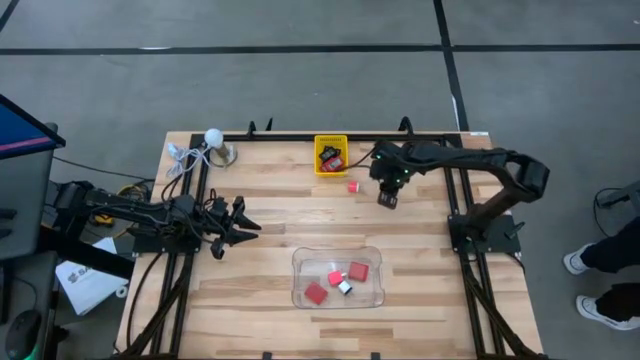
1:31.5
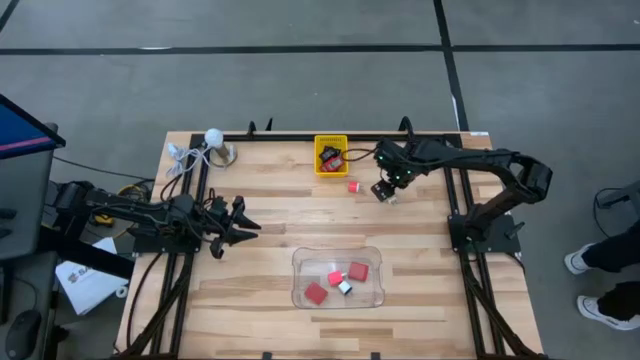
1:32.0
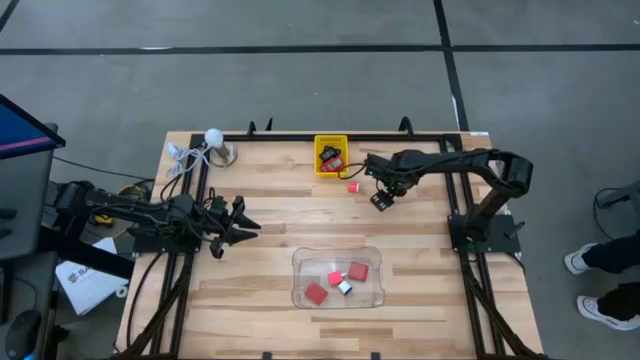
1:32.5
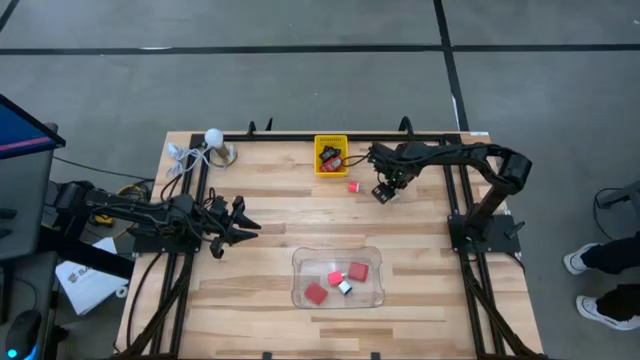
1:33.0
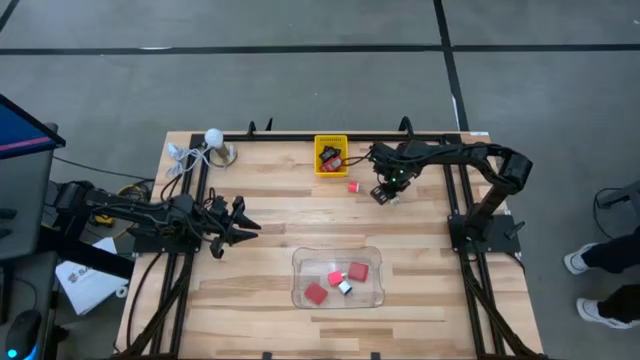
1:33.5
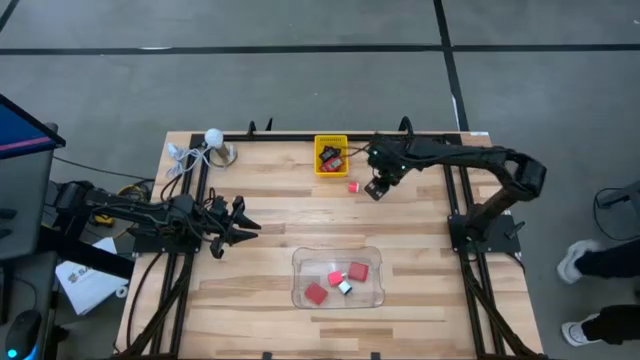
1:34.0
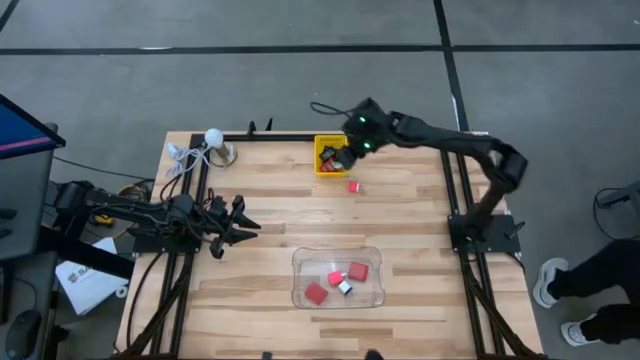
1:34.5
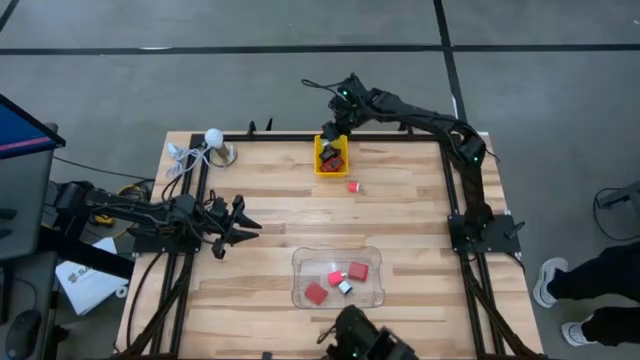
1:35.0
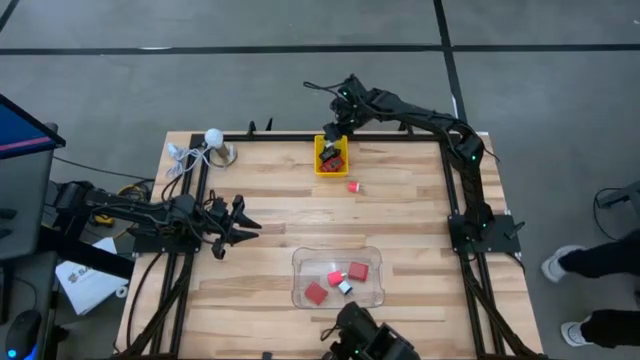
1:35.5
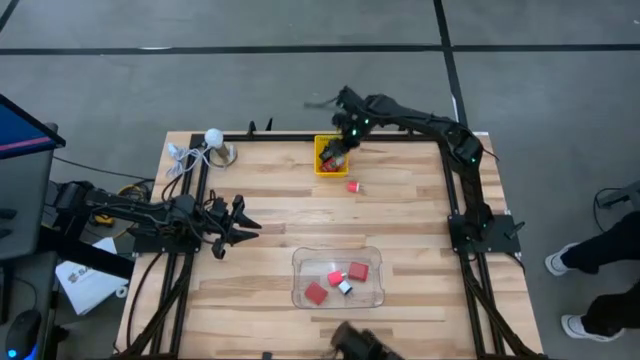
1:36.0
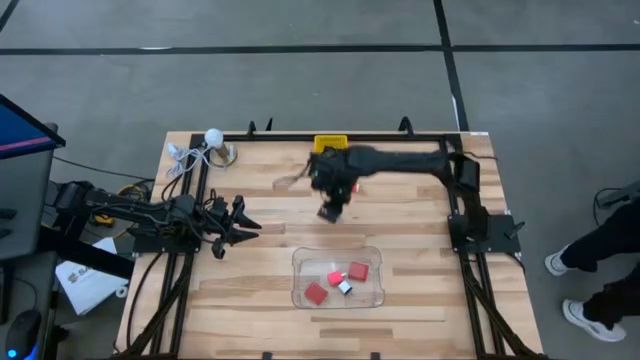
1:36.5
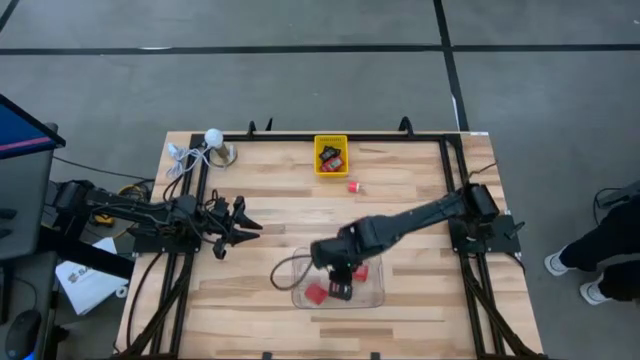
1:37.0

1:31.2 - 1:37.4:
Task: Pick & Place Office items
Put the green charger adapter into the transparent bin

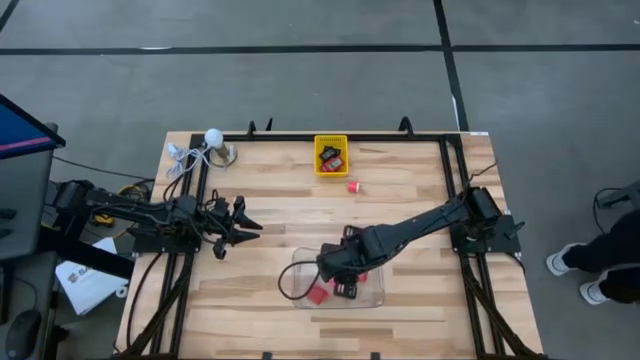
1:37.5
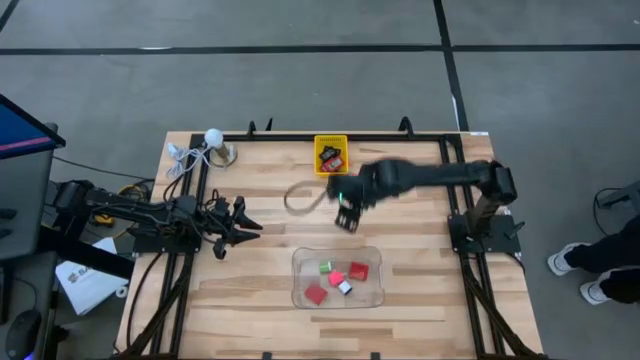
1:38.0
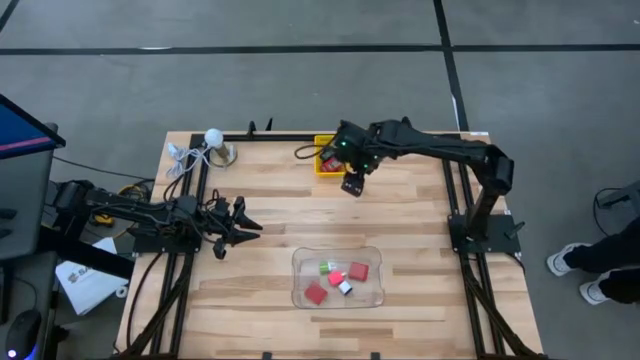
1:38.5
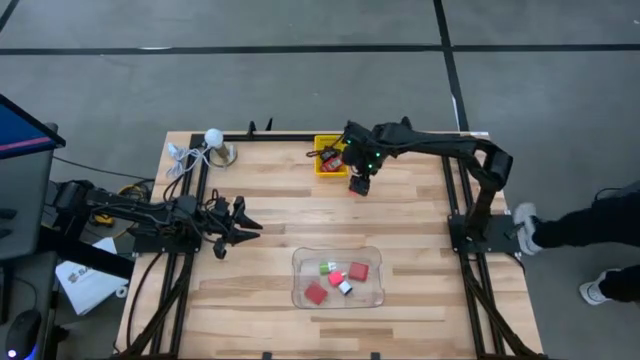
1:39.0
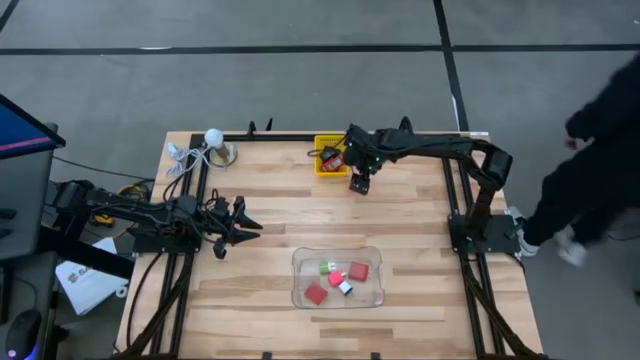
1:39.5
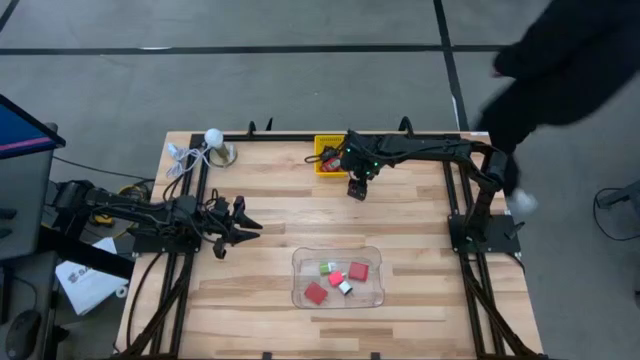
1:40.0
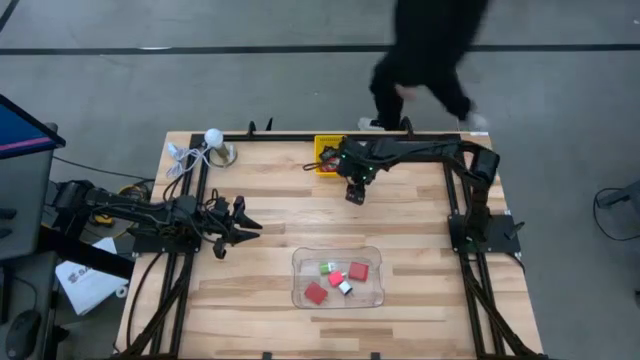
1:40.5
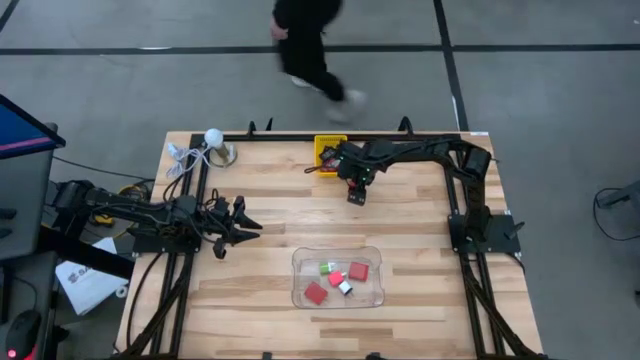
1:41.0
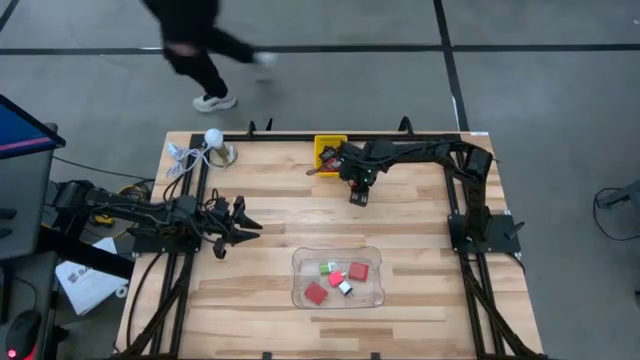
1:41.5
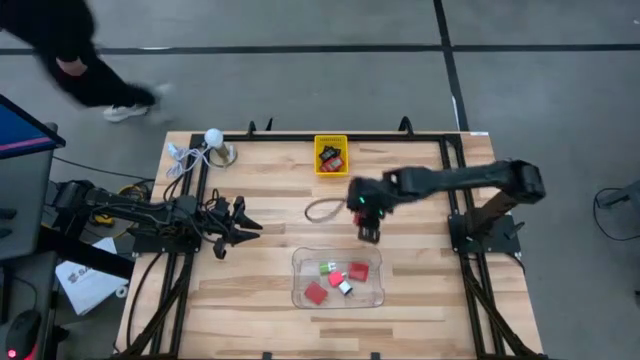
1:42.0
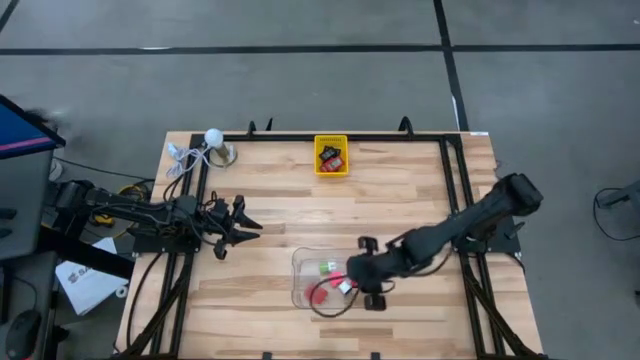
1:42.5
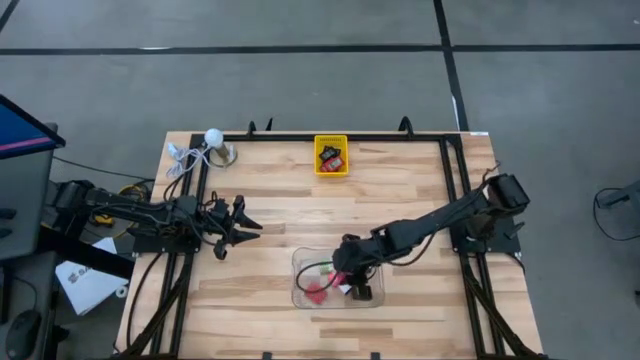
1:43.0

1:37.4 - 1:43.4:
Put the pink charger adapter into the transparent bin

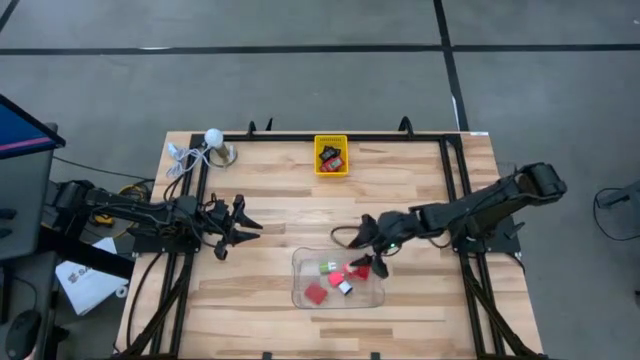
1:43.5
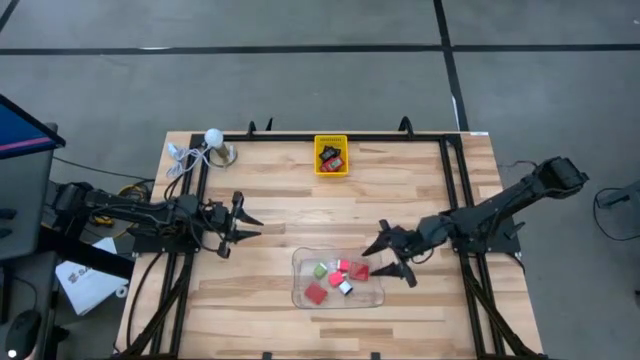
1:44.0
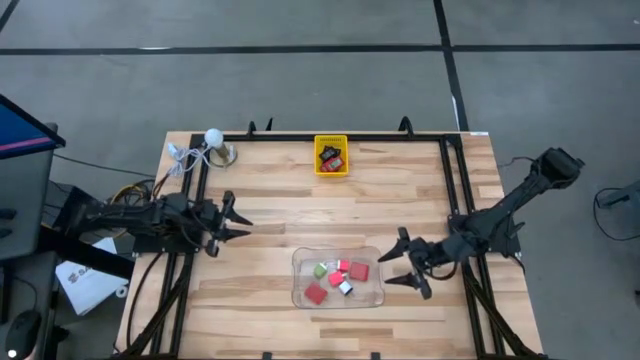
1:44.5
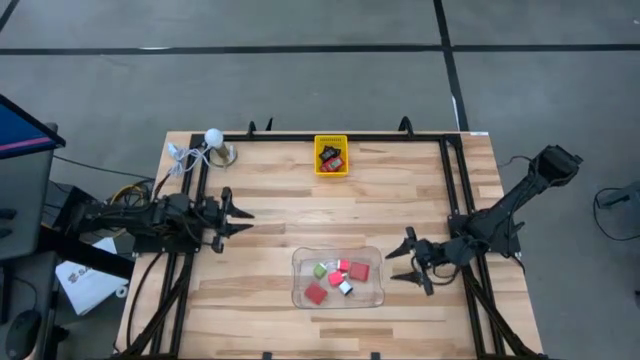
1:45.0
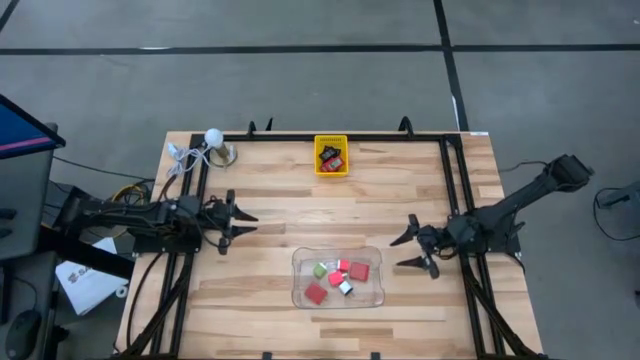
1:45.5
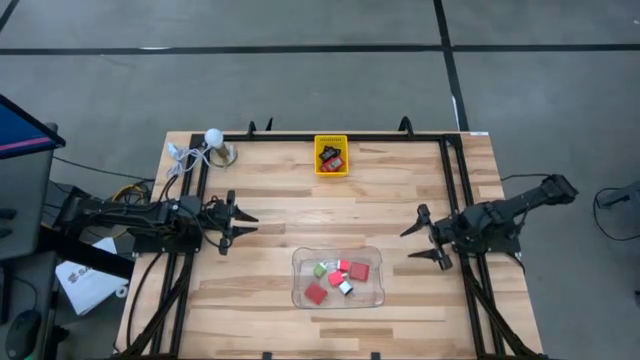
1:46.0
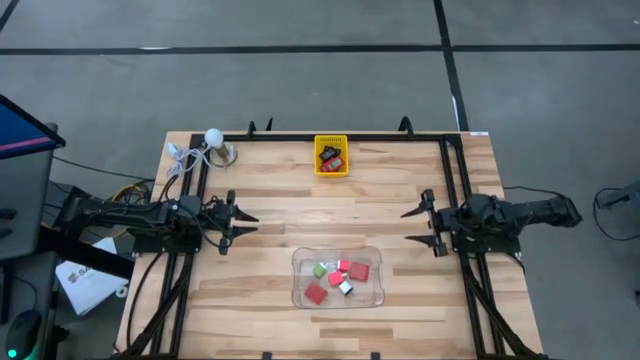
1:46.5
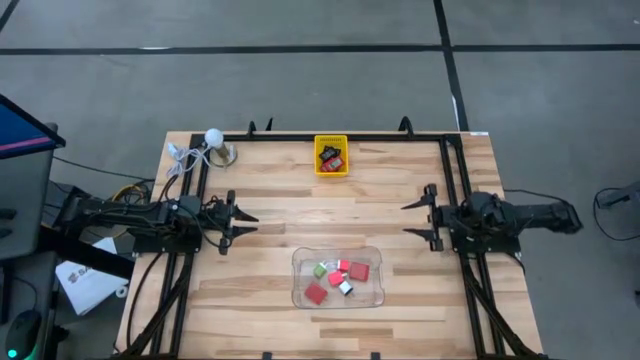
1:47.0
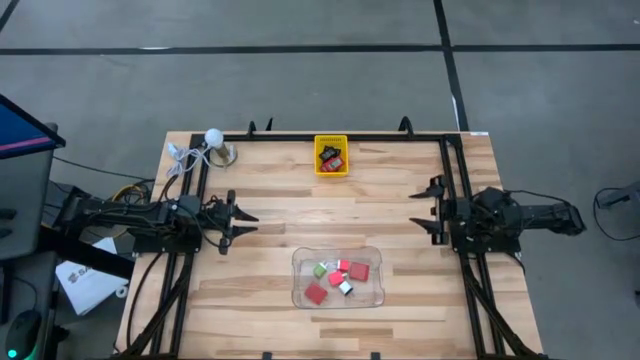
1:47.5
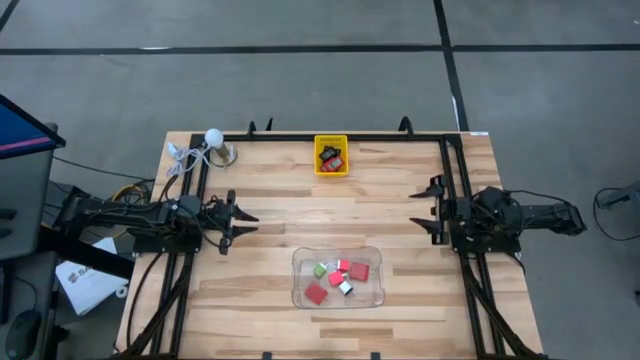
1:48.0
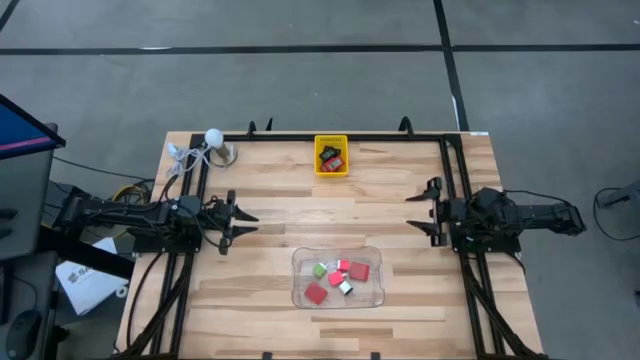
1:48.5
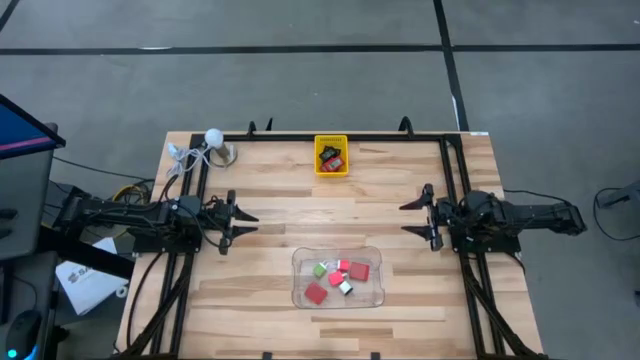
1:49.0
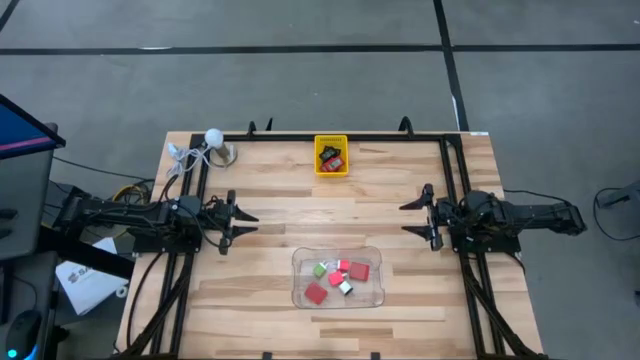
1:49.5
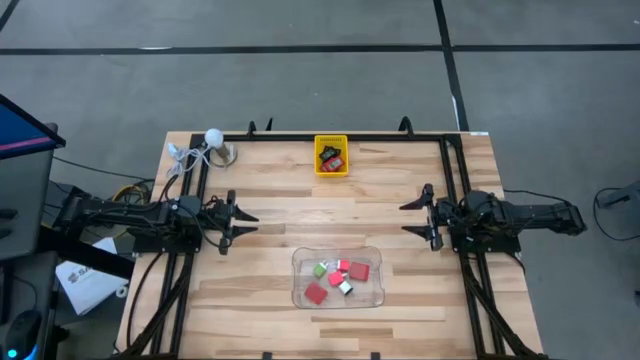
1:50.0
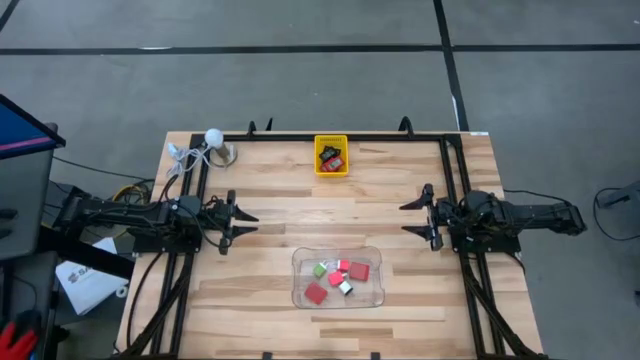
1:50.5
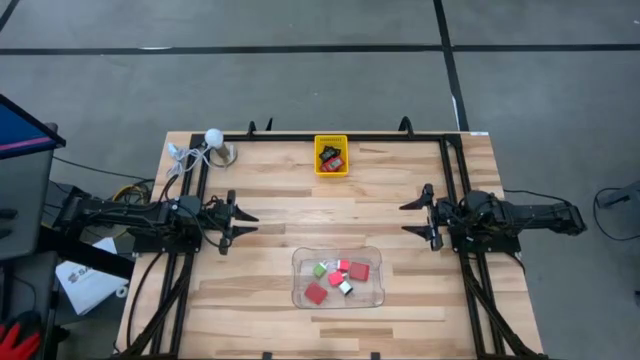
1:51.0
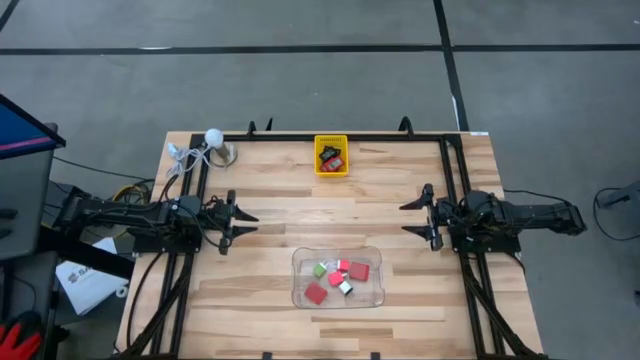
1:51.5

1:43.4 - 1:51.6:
Return to Home Position
